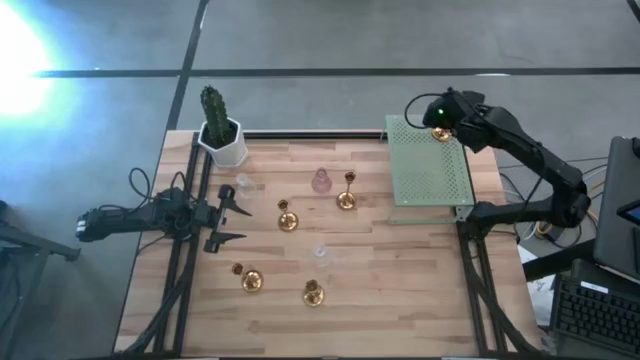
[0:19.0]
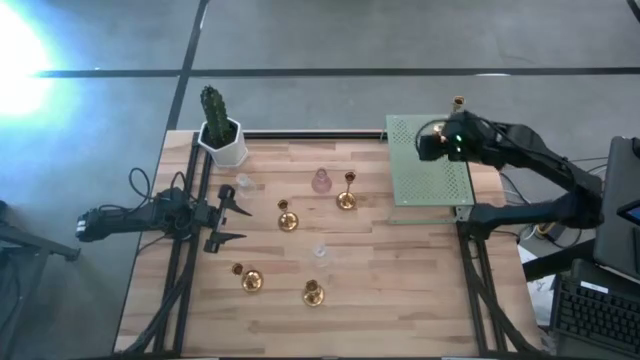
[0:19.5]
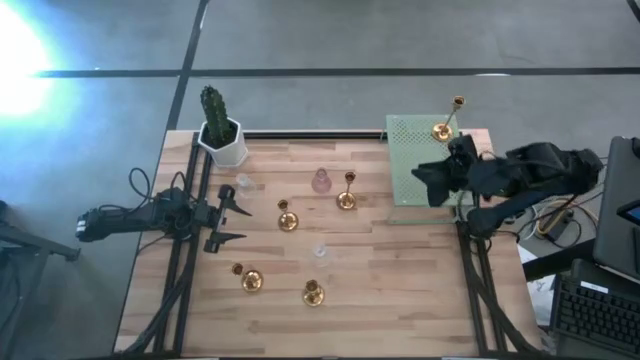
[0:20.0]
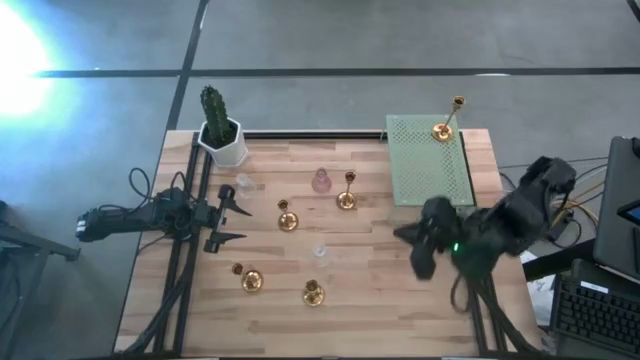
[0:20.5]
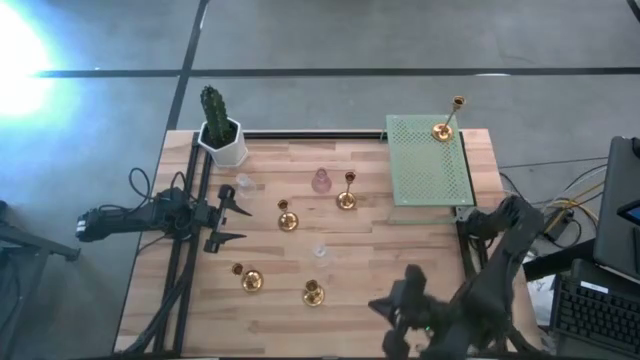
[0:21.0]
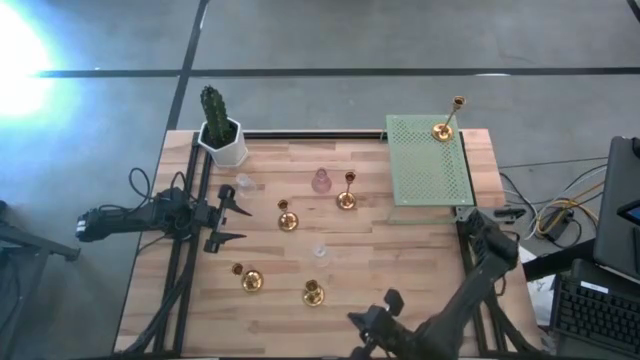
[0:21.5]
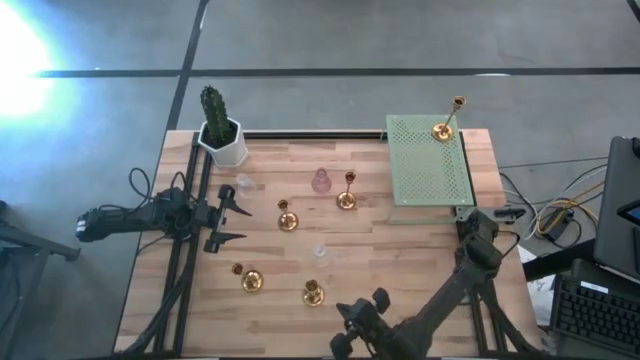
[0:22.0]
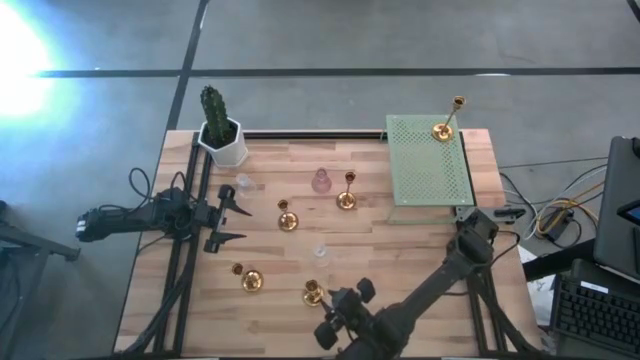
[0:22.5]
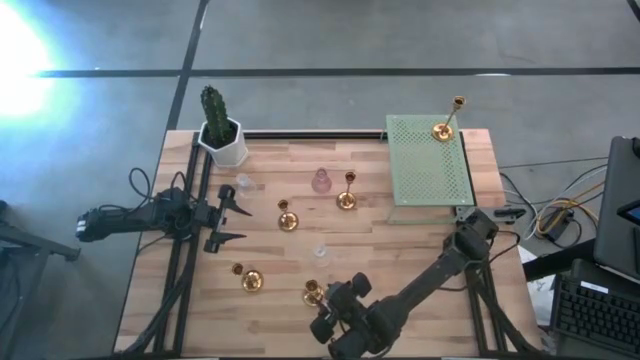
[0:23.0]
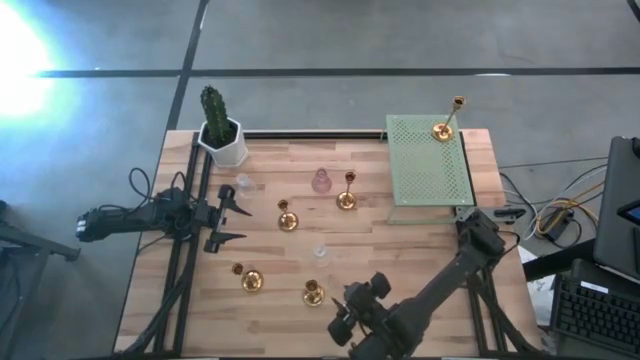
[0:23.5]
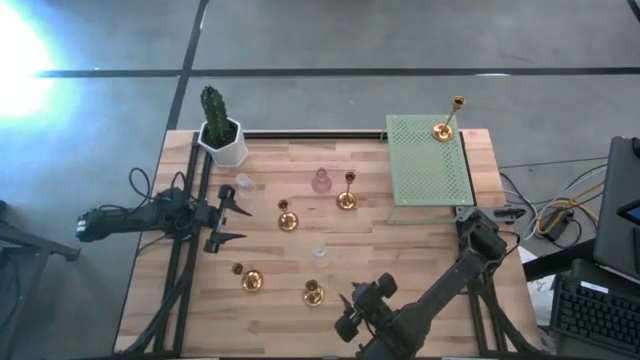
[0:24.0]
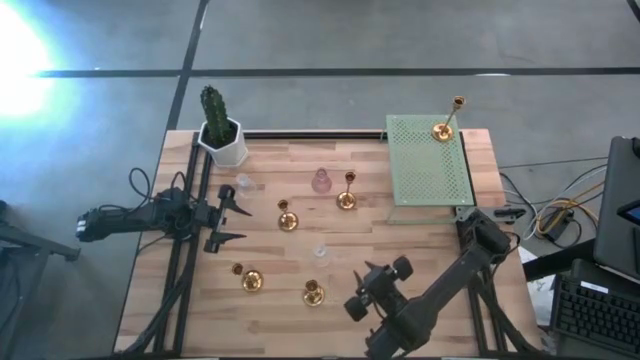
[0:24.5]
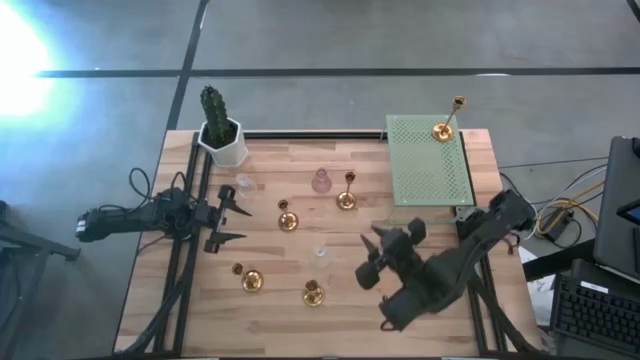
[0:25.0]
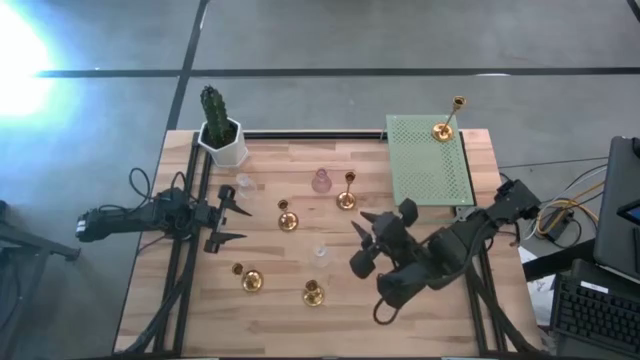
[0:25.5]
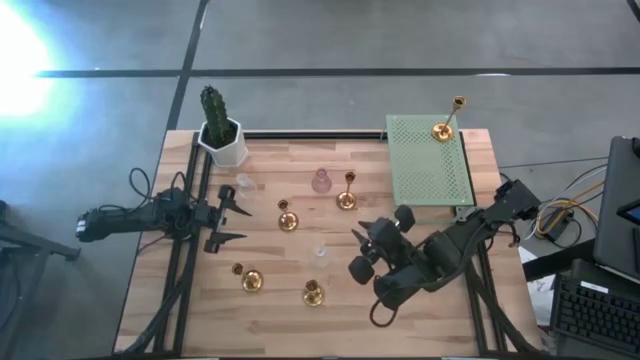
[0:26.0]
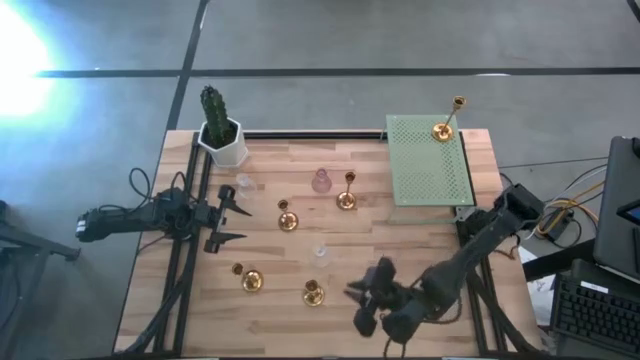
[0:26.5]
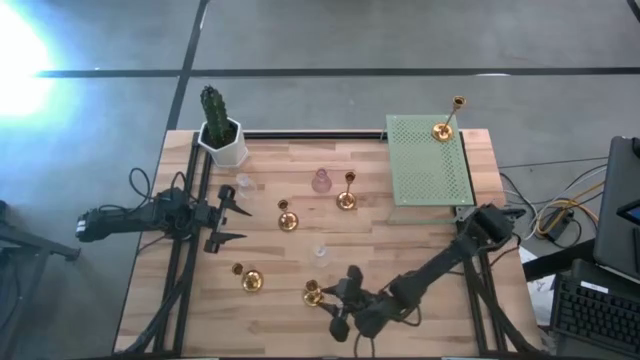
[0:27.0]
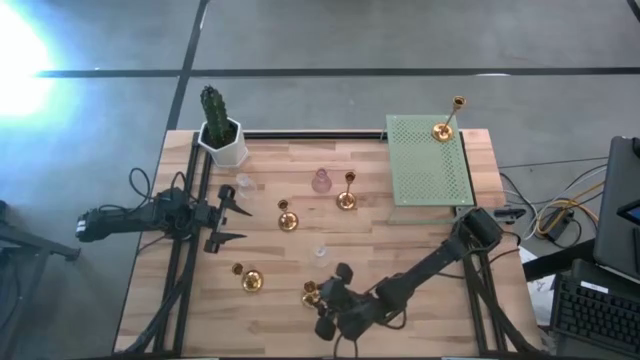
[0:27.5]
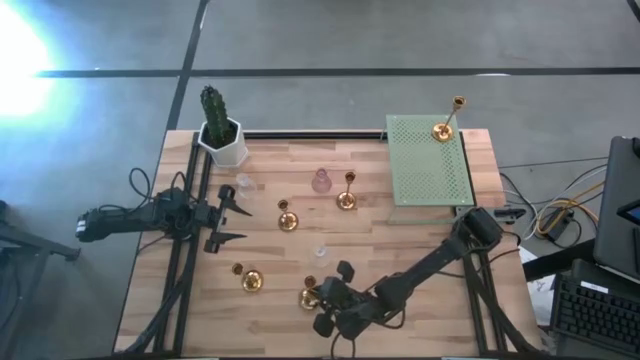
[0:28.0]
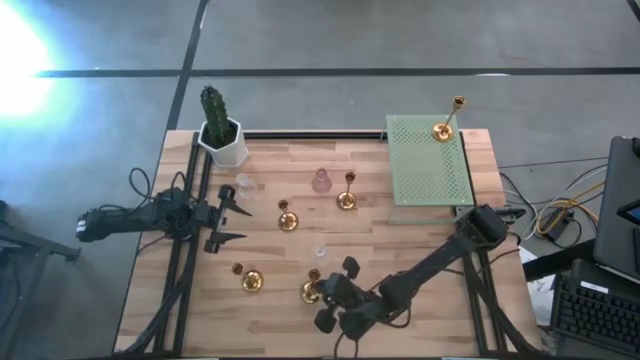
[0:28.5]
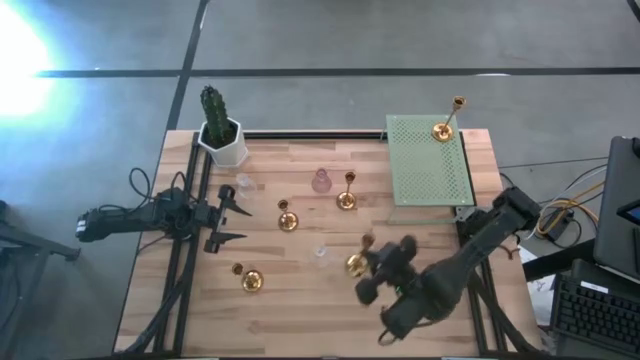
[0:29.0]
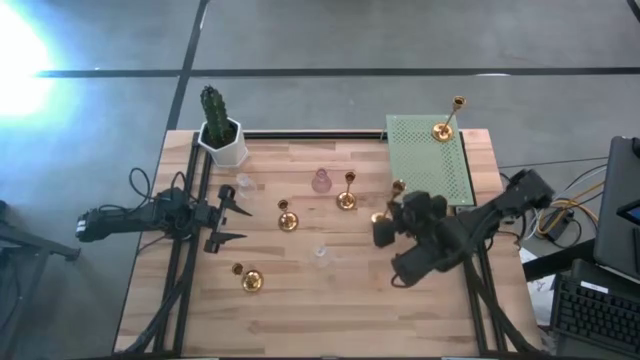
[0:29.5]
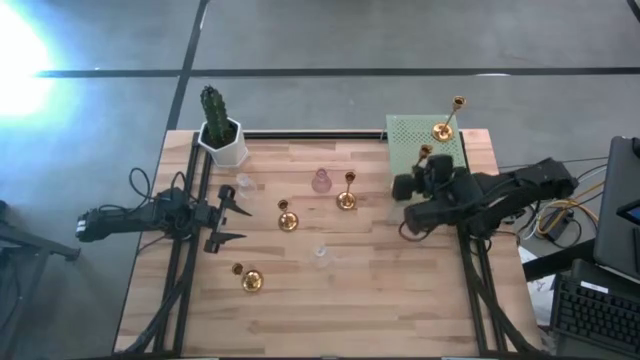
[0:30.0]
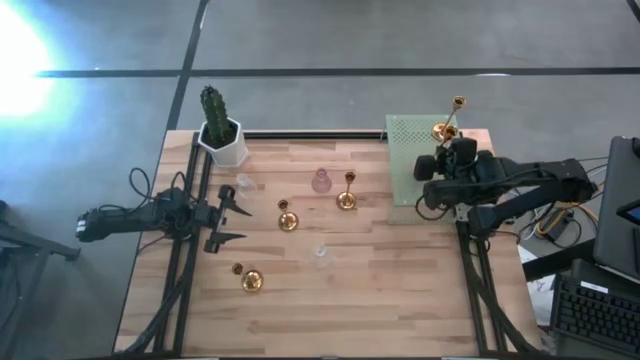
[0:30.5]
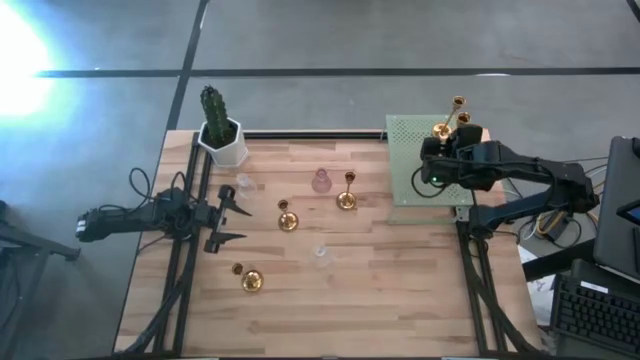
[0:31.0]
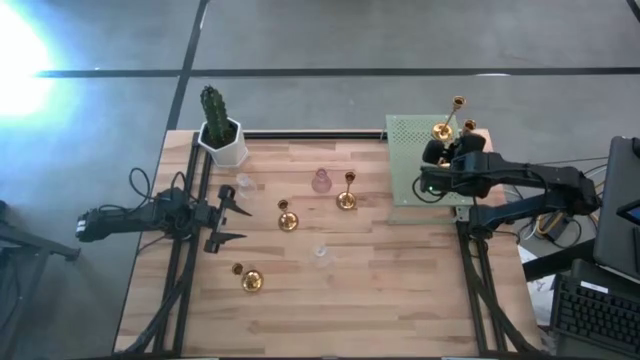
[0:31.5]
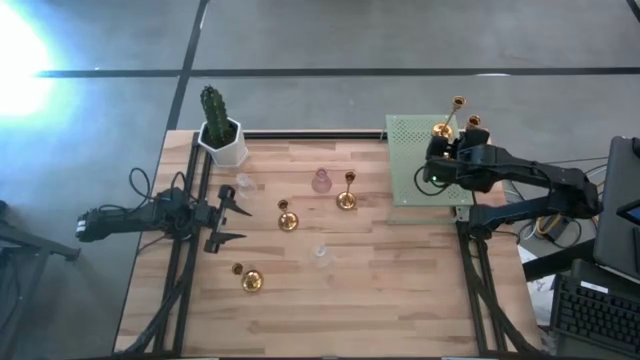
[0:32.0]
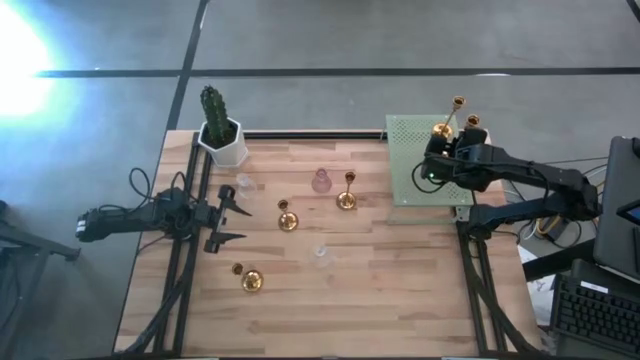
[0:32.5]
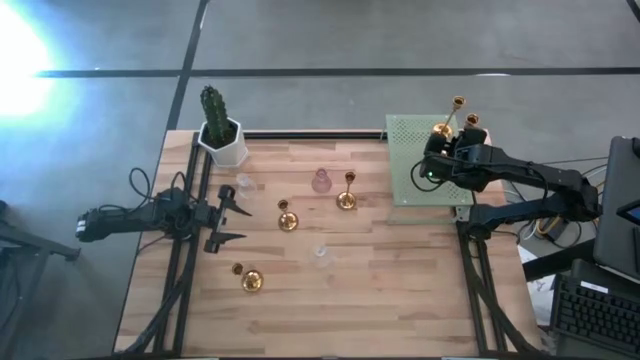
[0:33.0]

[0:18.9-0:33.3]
Task: Pick & Place candle stick holders
Put the gold candle holder on the shelf

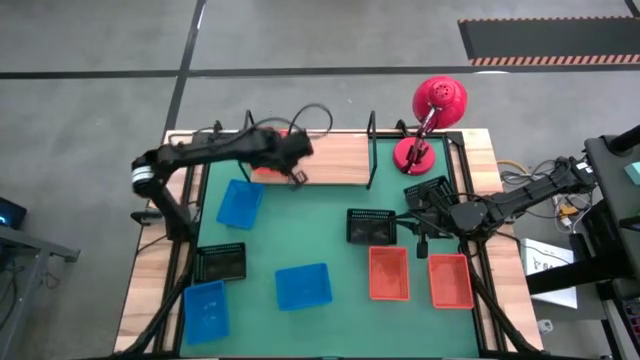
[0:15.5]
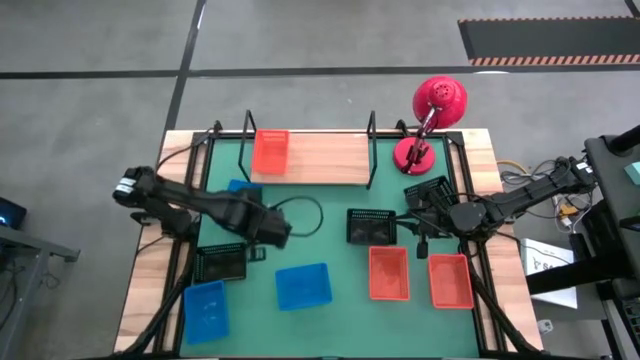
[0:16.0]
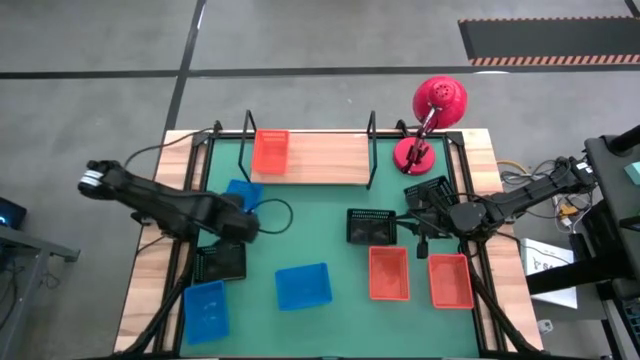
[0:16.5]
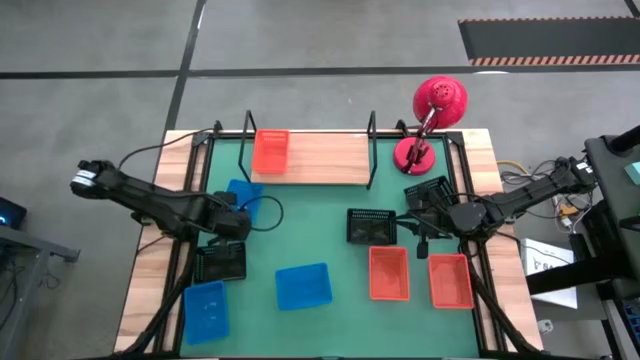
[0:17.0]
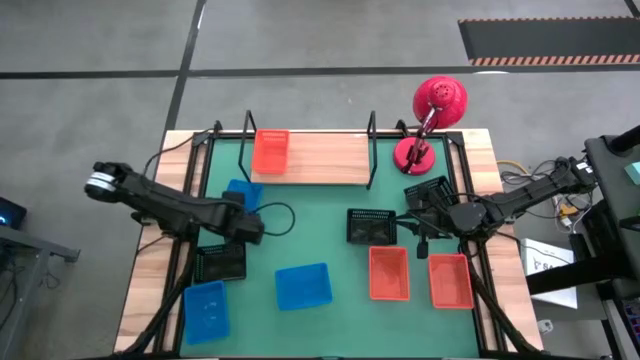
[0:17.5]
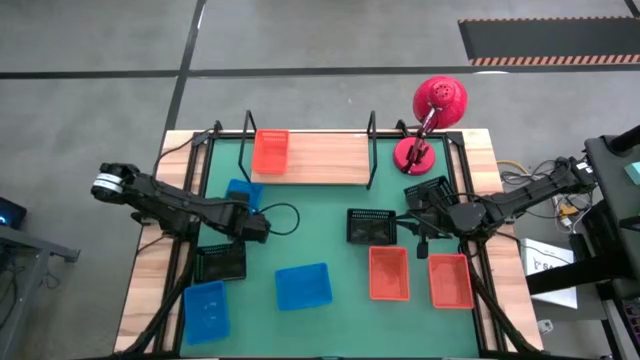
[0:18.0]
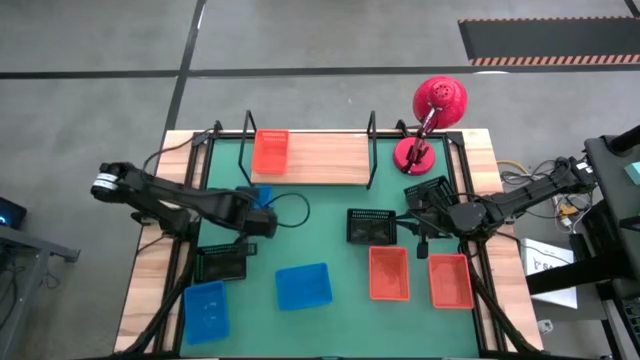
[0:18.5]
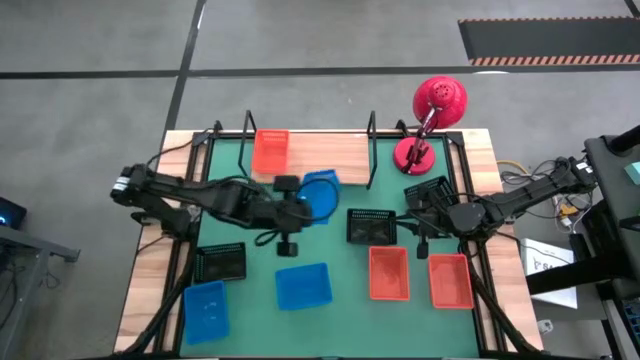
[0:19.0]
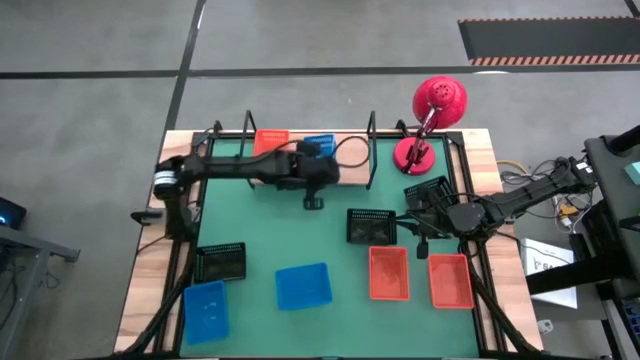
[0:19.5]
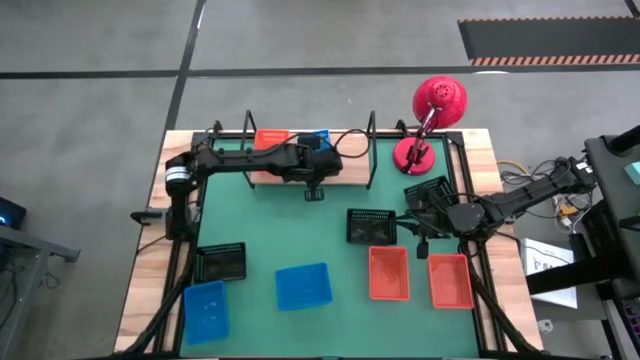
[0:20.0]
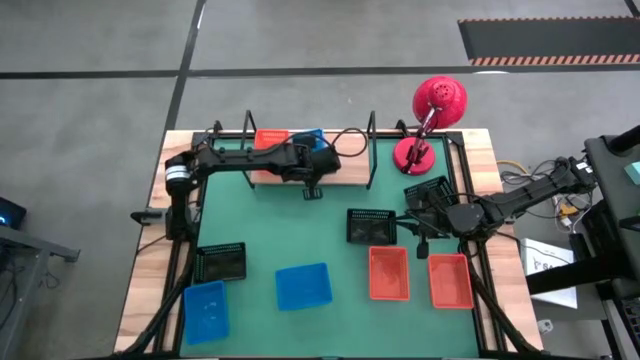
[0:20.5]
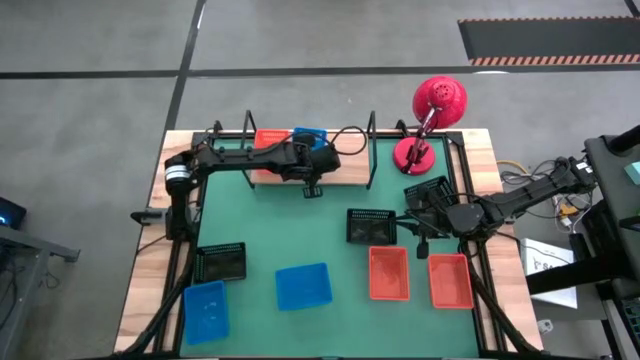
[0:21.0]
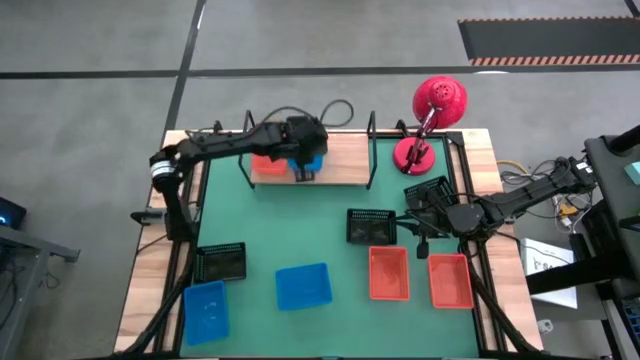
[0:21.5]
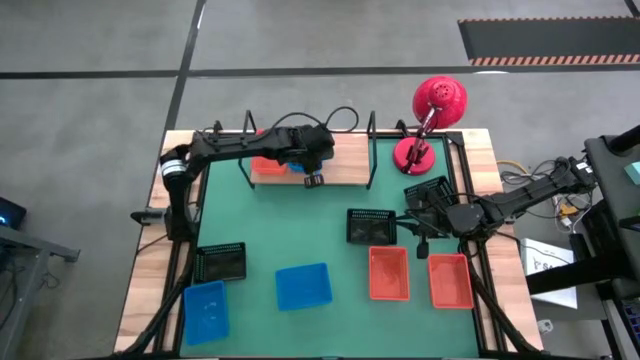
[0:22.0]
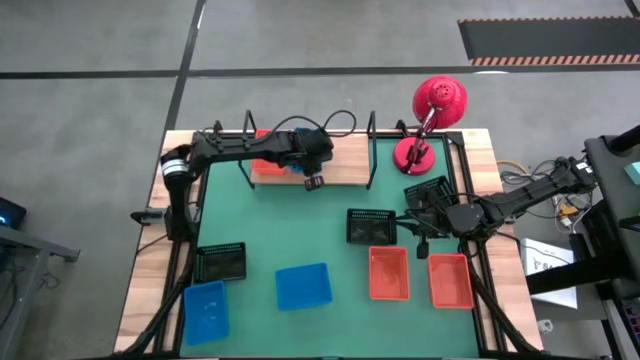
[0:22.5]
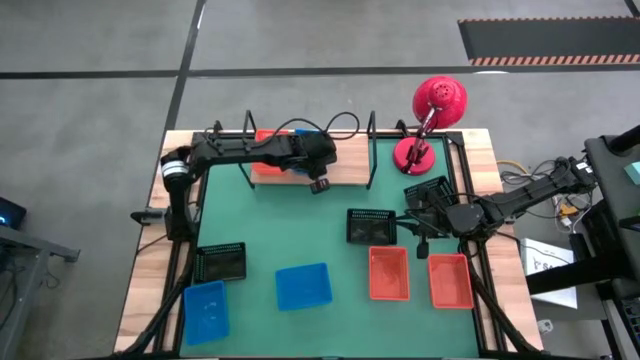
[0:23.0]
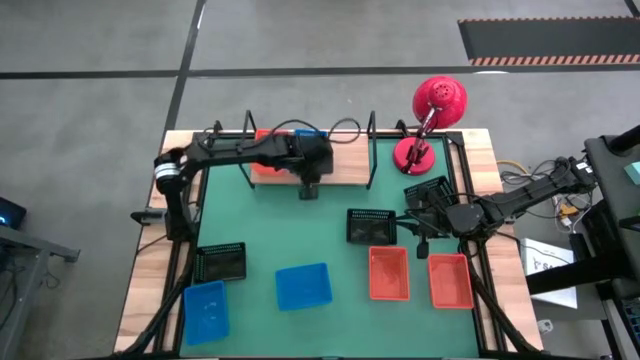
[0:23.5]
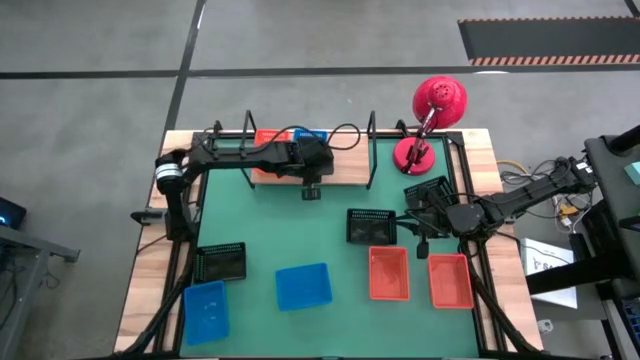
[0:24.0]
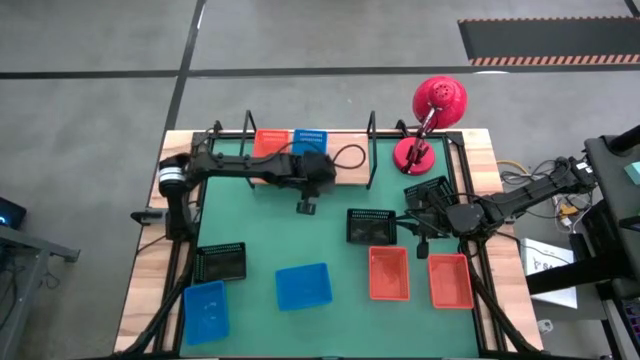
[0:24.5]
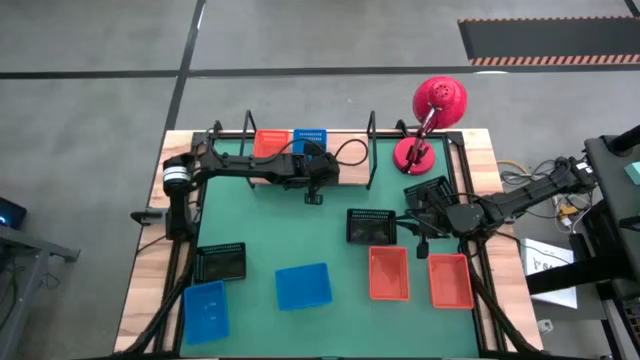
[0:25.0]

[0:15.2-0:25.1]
Task: Stack baskets on shelf by color
Put the top blue basket on the shelf
